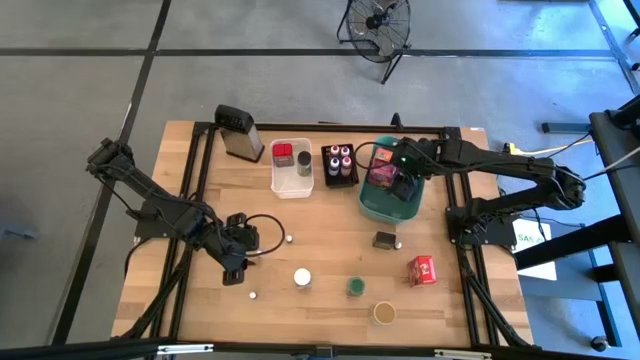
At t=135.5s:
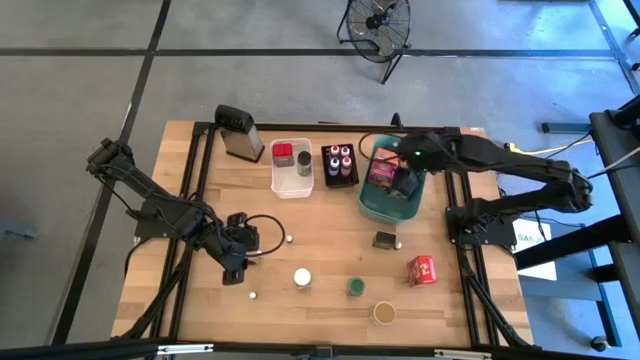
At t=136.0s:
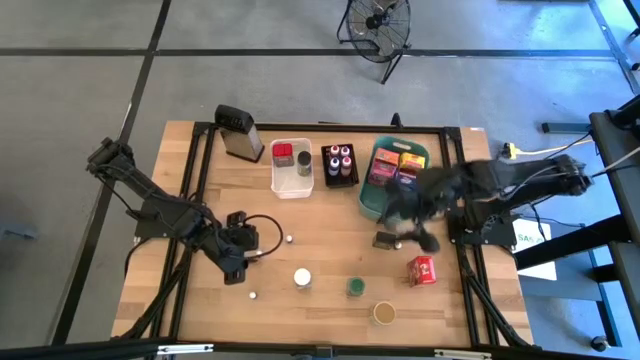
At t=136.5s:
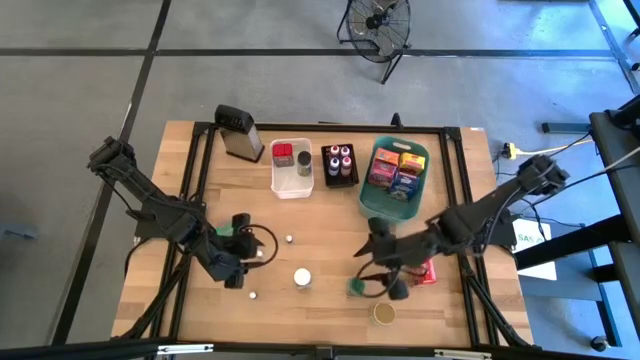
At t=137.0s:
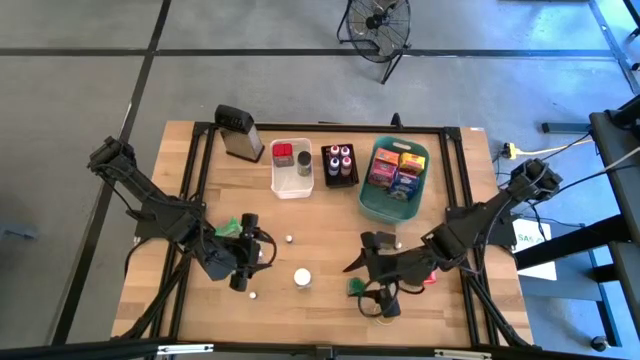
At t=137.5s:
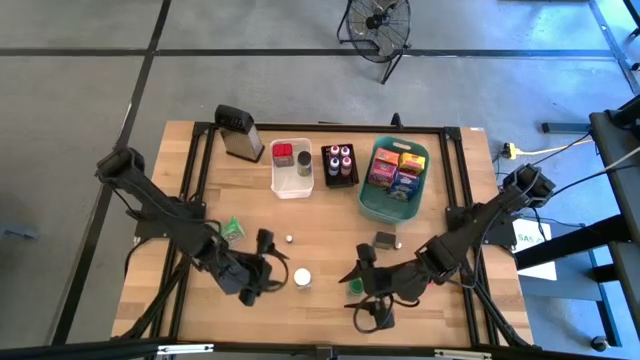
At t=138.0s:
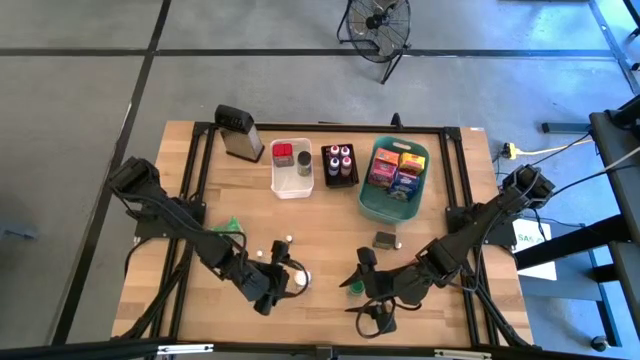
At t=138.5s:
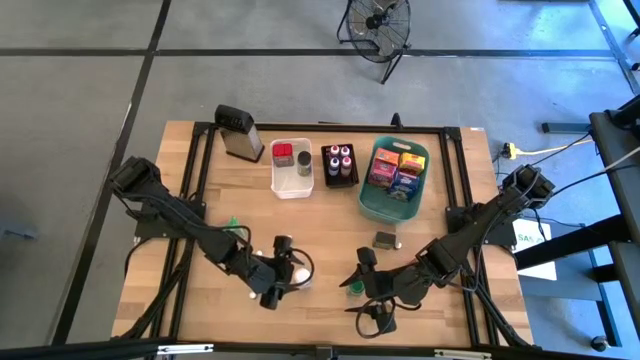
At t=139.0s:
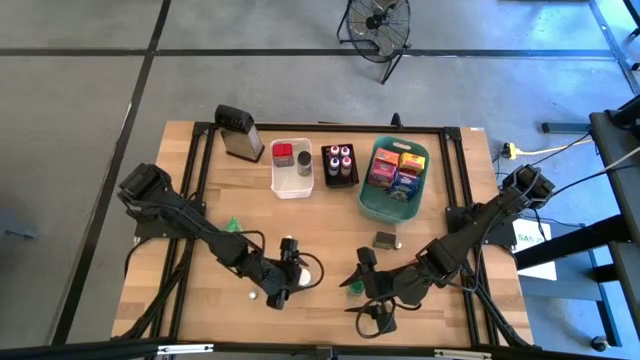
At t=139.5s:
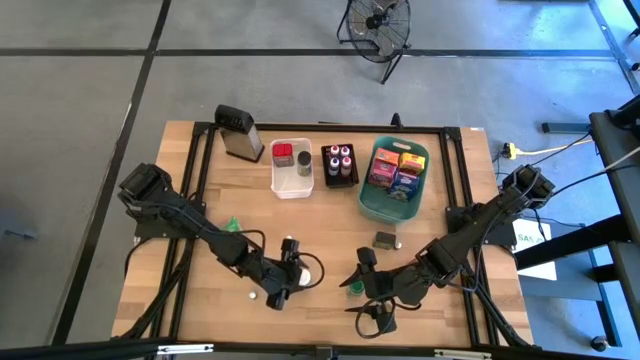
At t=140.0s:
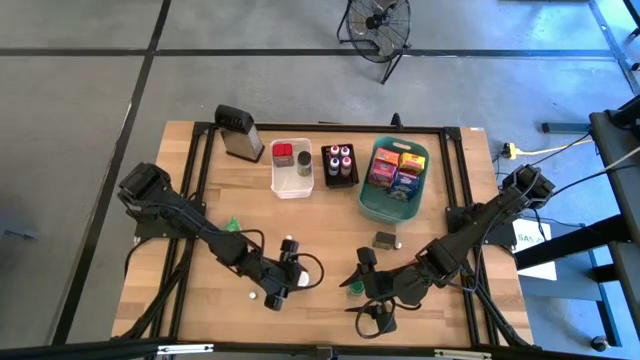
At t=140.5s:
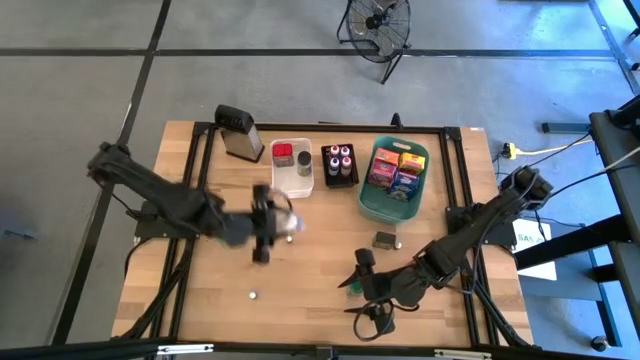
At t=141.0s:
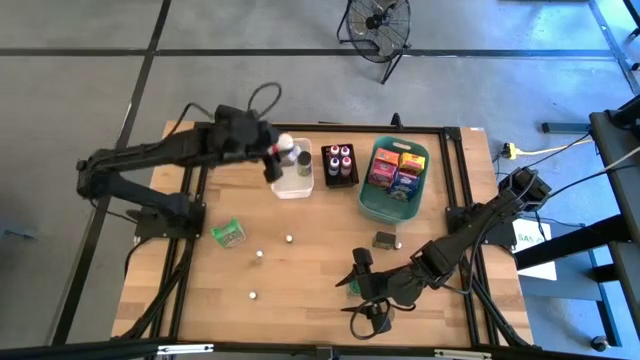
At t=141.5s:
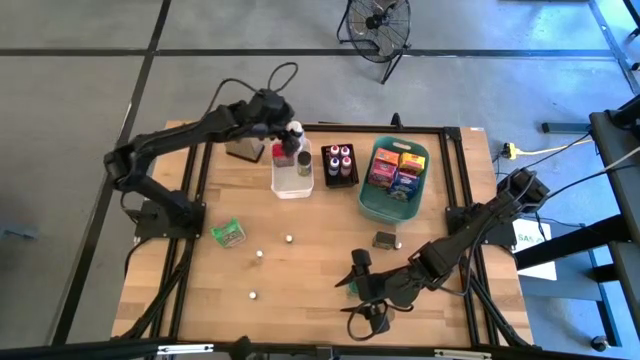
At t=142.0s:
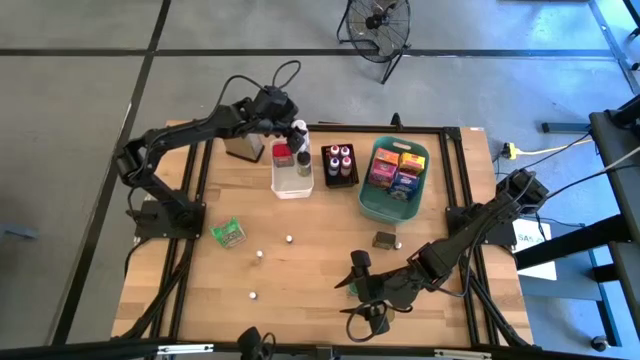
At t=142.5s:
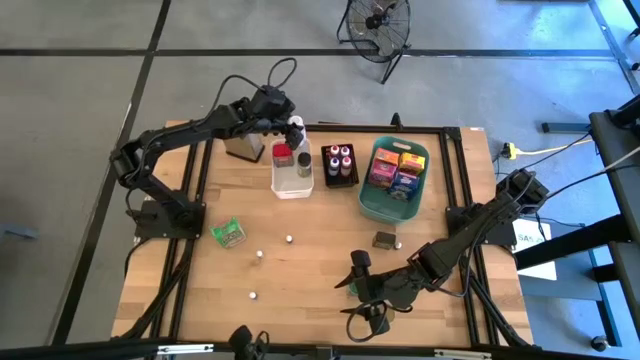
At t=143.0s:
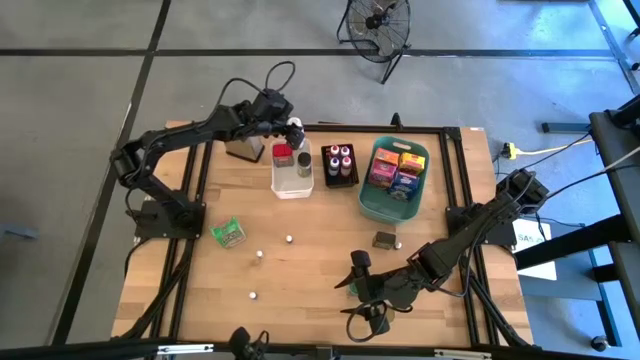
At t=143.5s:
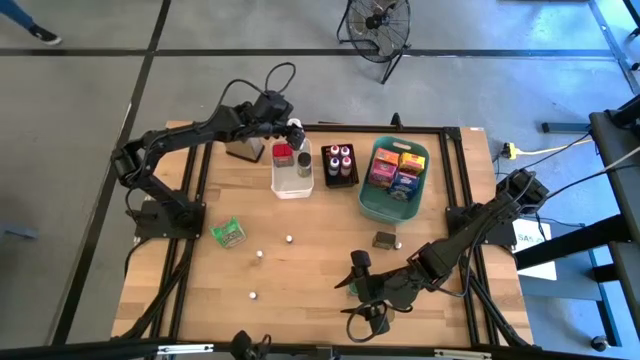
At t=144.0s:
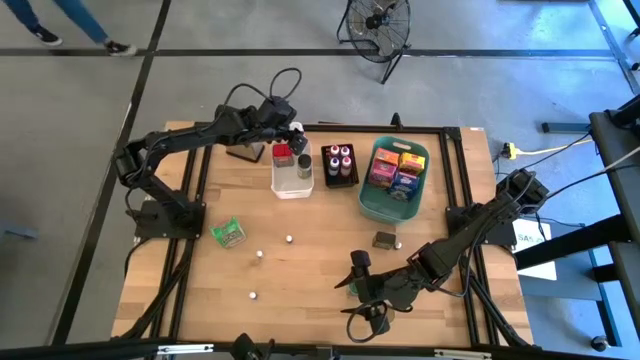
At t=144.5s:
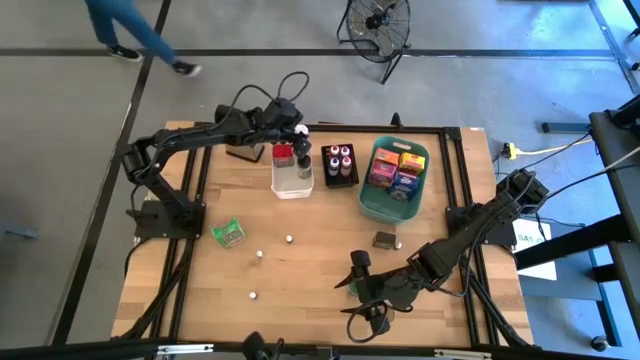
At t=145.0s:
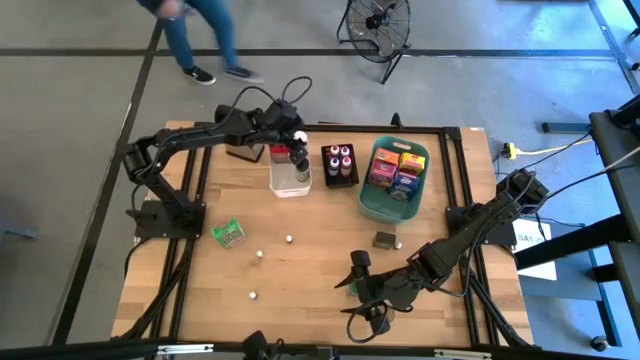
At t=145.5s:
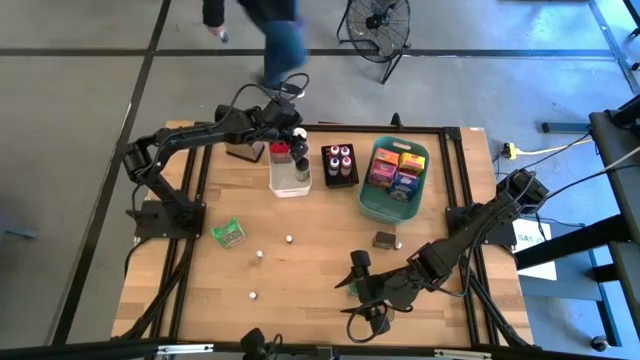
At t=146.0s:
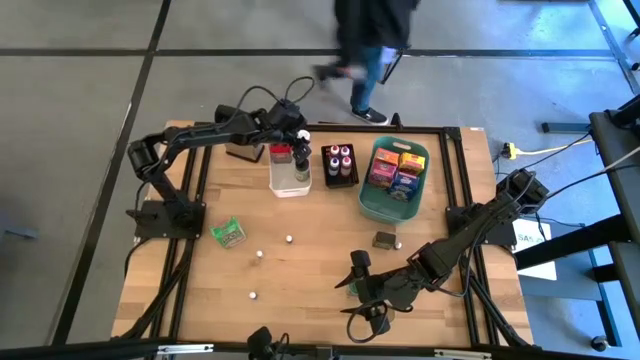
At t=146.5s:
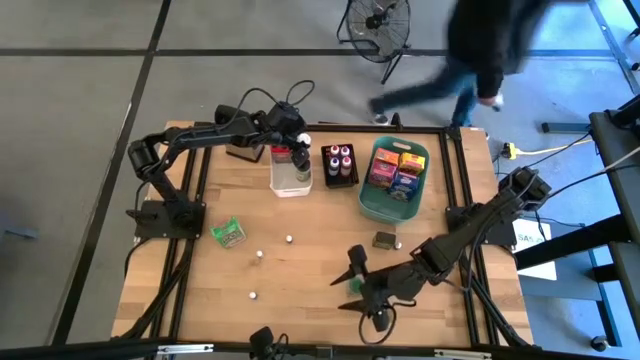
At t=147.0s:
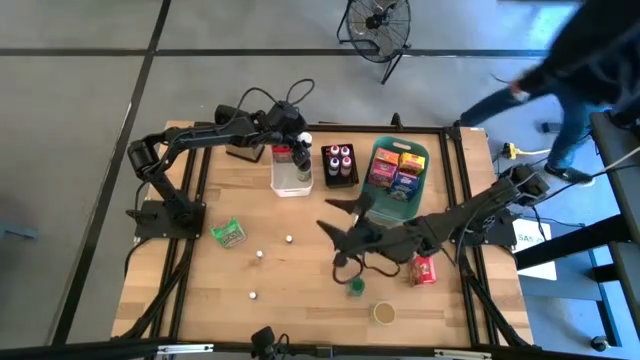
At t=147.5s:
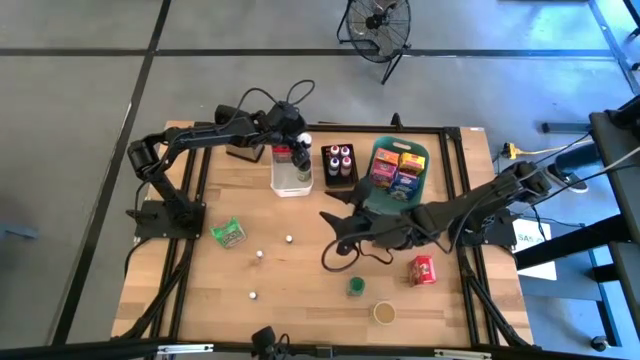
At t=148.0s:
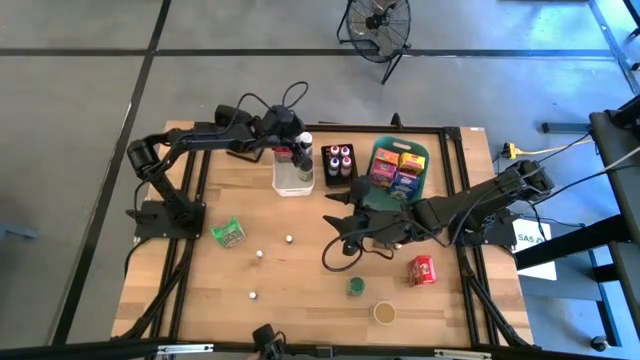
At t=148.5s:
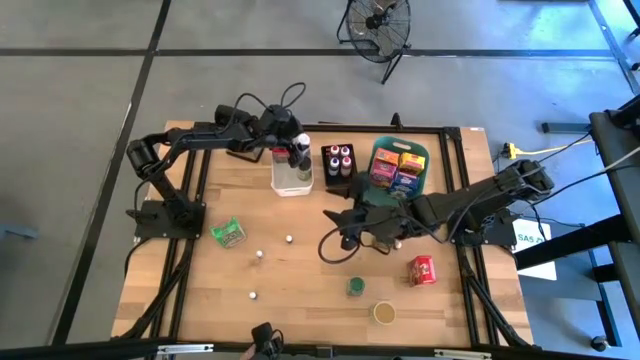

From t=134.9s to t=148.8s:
Task: Pick & Place Kitchen Items
Put the white spice bottle into the white bin

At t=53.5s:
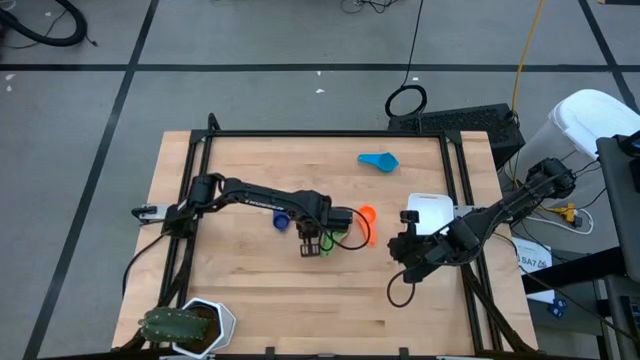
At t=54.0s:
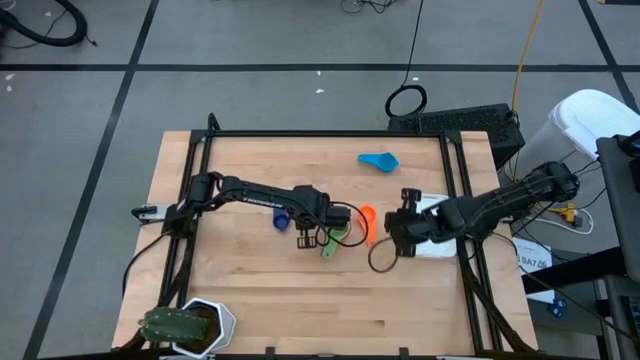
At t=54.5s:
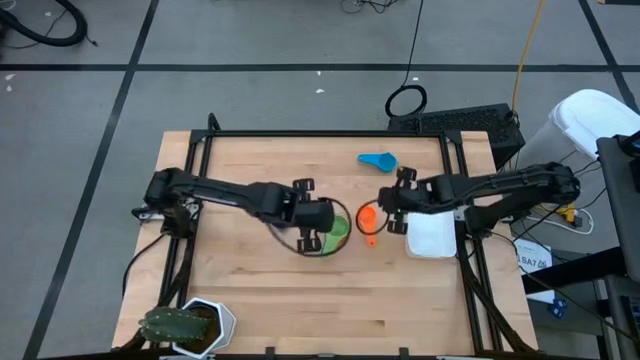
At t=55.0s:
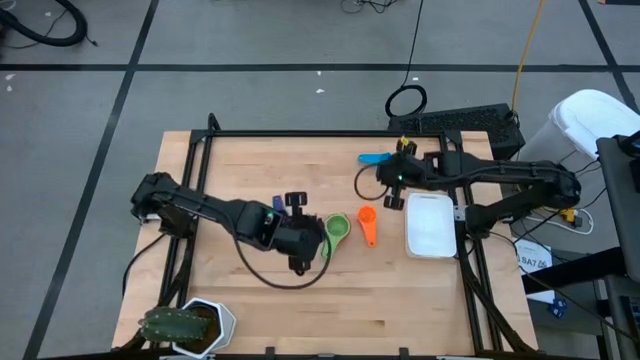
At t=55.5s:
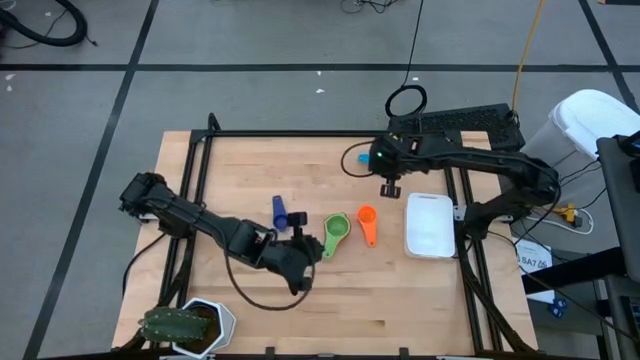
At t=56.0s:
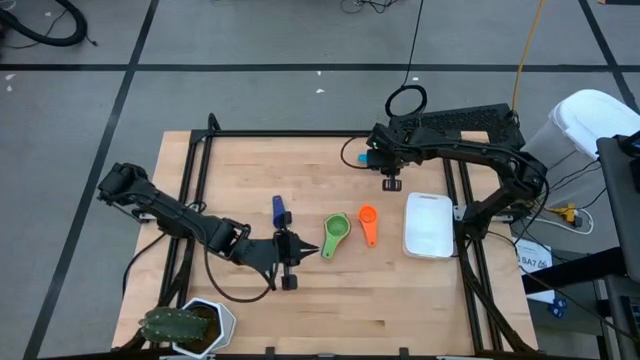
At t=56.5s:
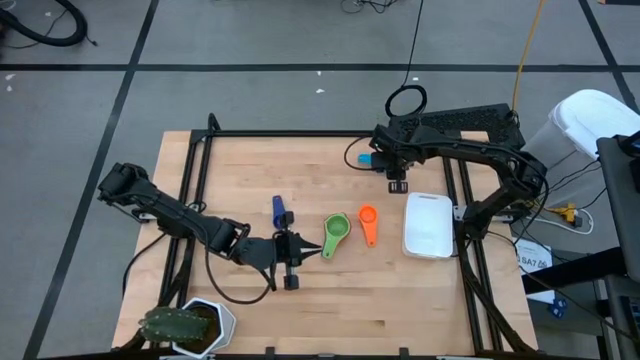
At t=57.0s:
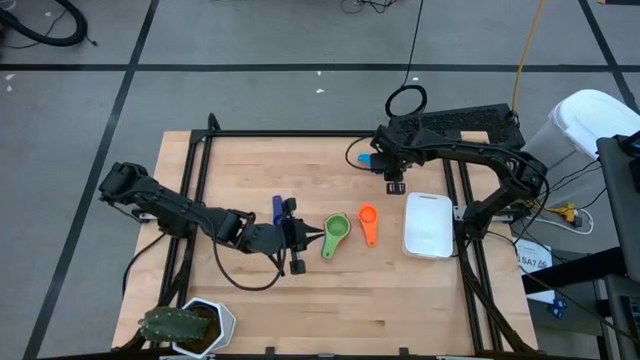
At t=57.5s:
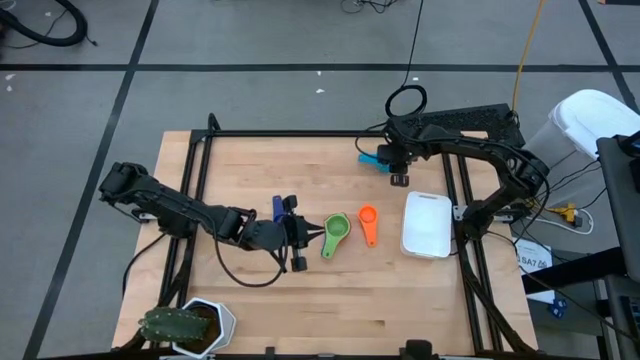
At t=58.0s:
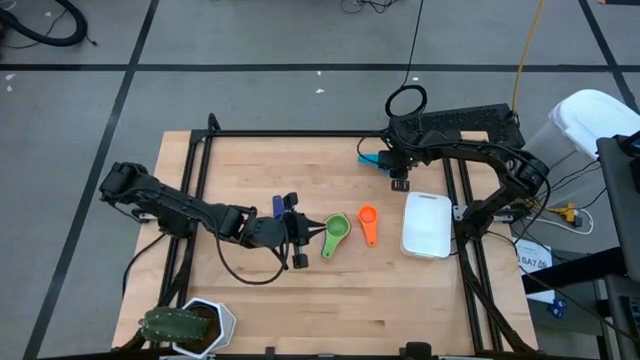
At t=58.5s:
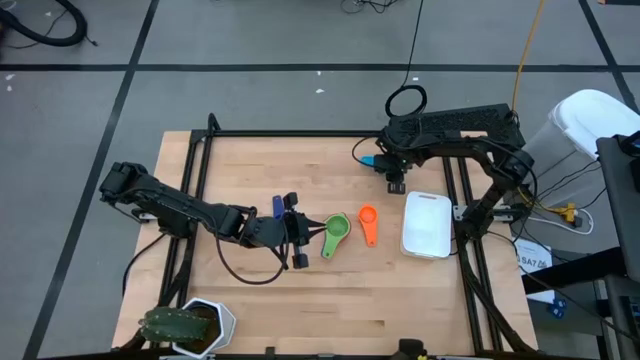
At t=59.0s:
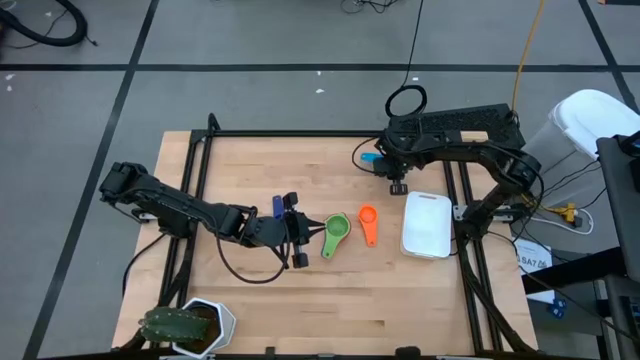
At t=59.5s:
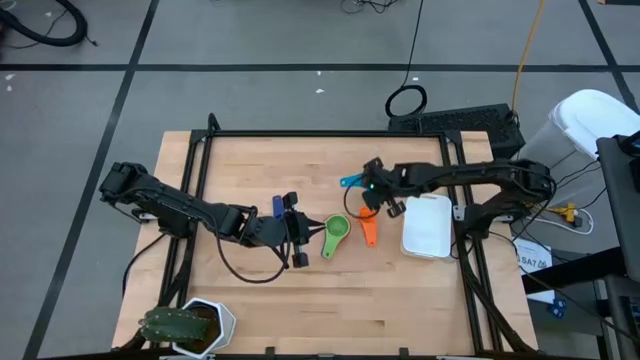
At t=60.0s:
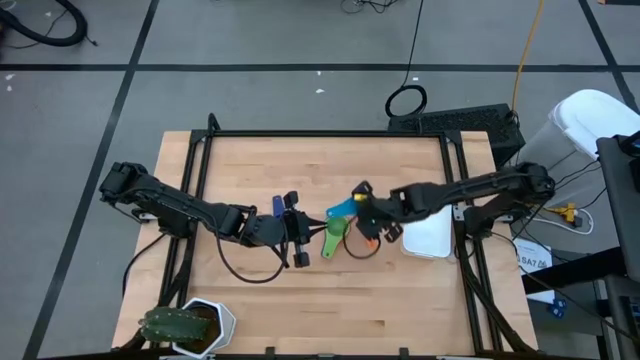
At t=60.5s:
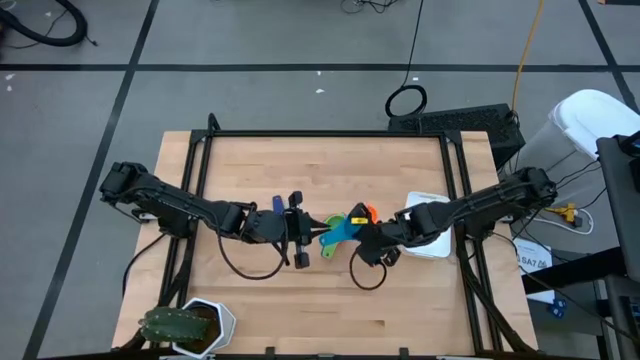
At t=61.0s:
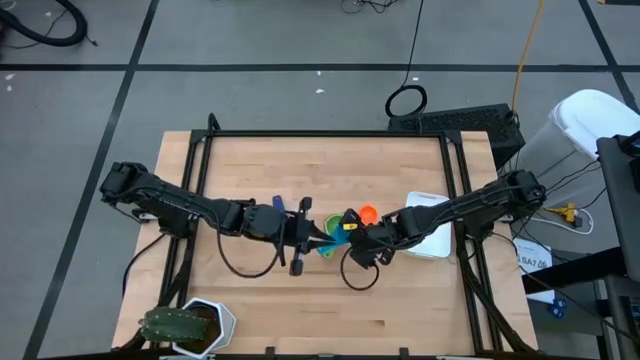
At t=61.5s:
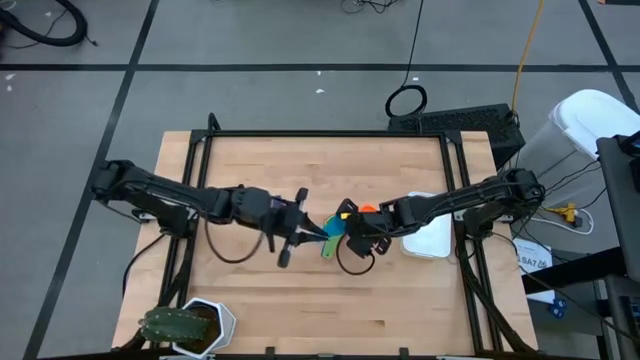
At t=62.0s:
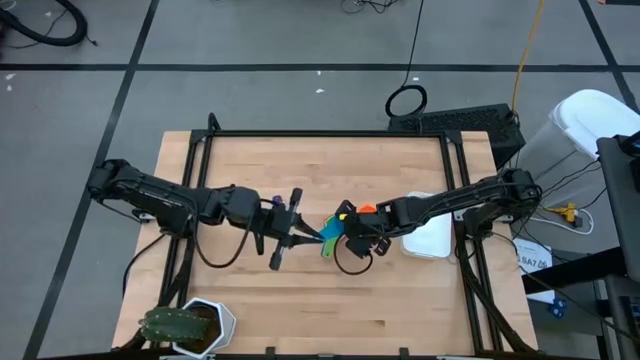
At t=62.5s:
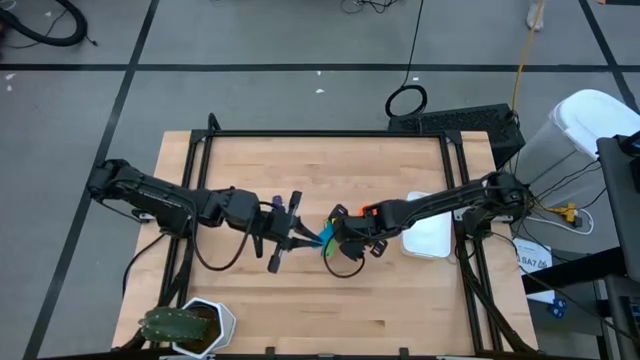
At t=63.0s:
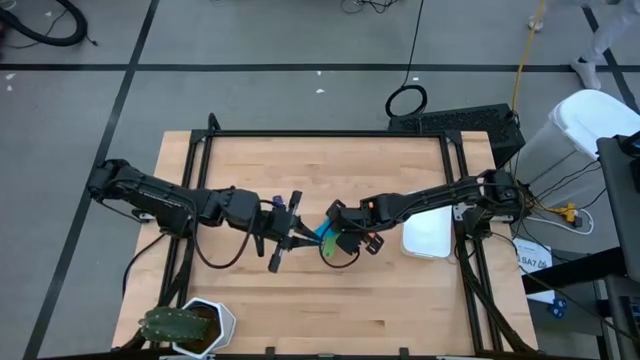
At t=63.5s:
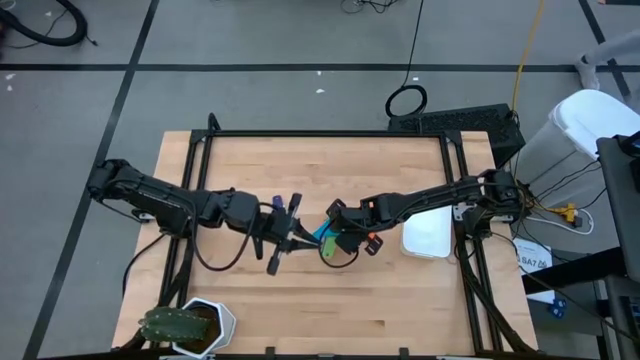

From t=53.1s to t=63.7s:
Task: Nest measuring cups in basket
Stack the light blue measuring cup on top of the green measuring cup
